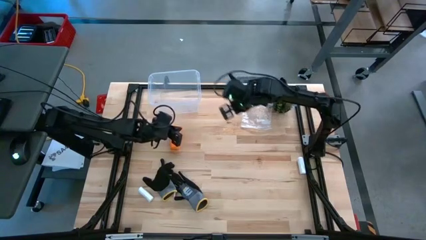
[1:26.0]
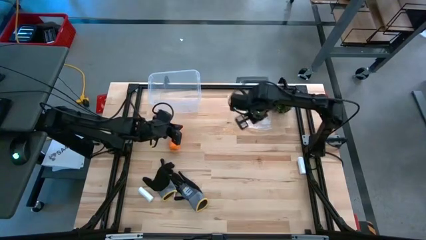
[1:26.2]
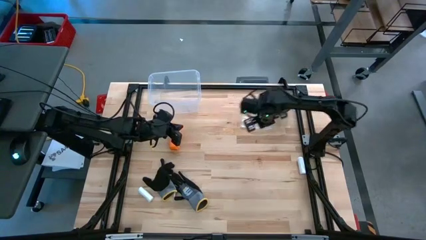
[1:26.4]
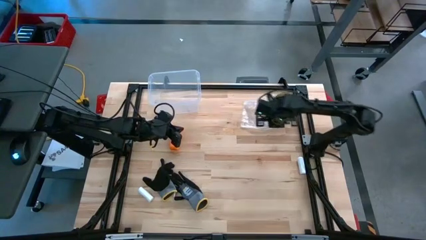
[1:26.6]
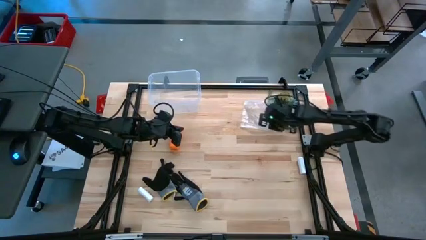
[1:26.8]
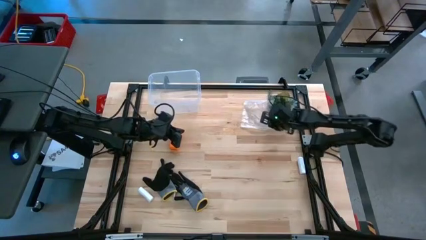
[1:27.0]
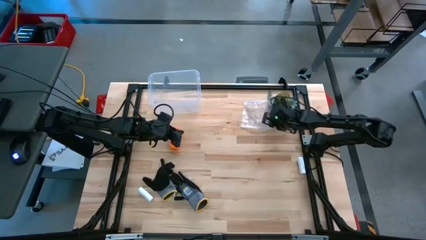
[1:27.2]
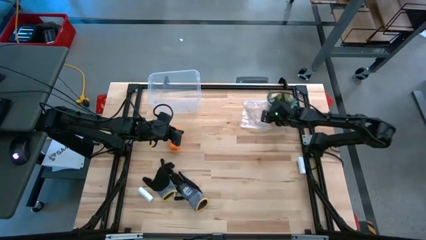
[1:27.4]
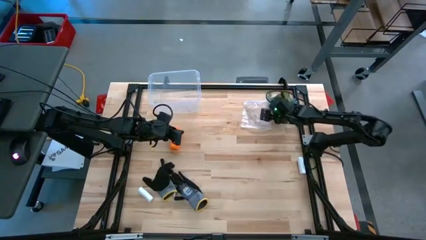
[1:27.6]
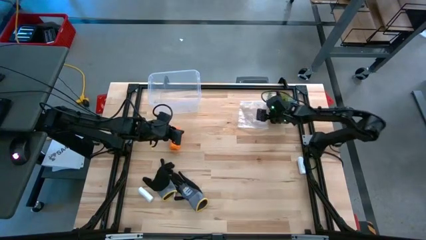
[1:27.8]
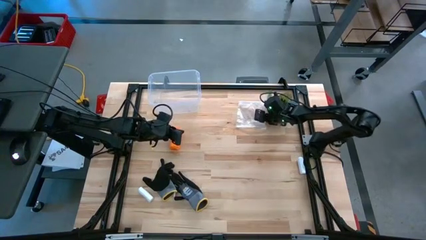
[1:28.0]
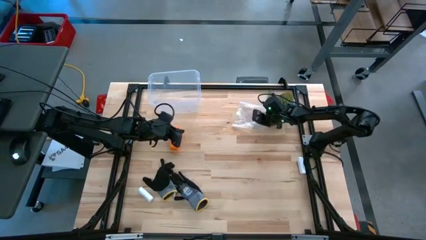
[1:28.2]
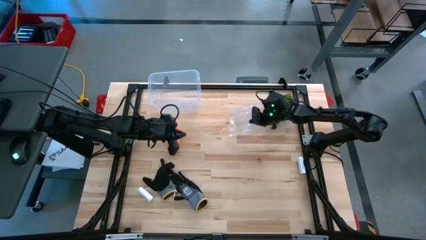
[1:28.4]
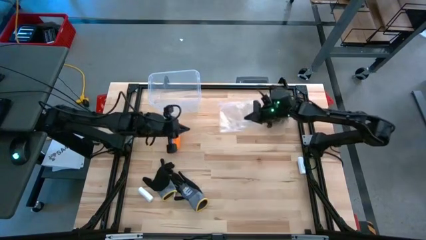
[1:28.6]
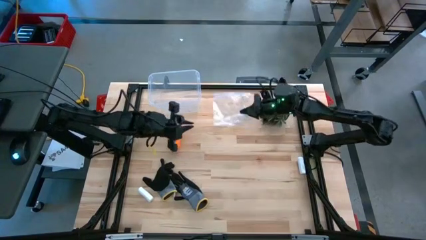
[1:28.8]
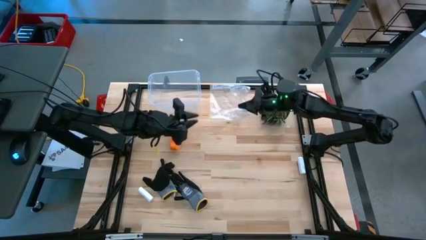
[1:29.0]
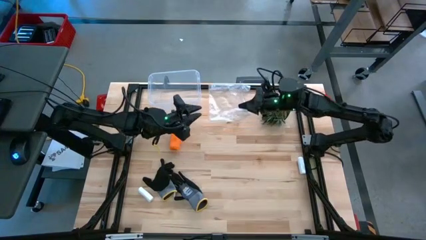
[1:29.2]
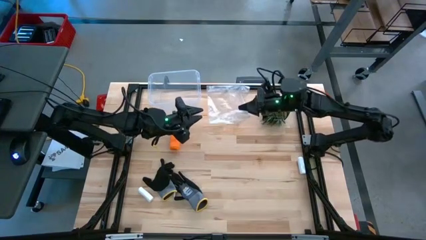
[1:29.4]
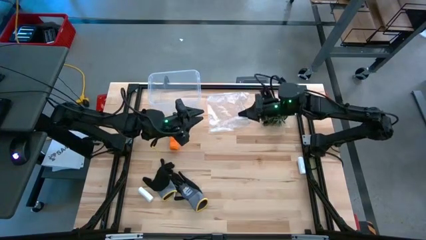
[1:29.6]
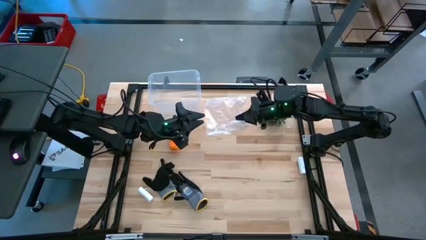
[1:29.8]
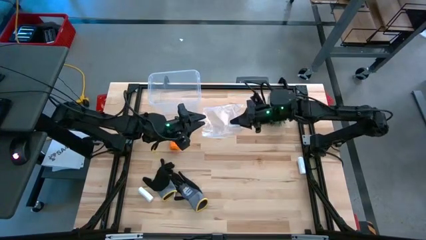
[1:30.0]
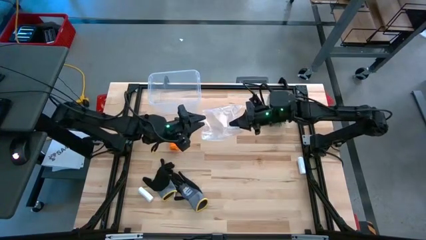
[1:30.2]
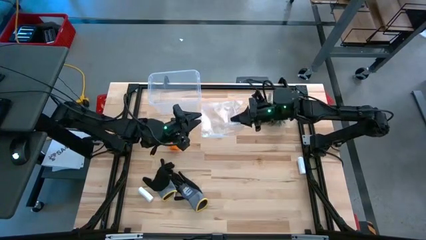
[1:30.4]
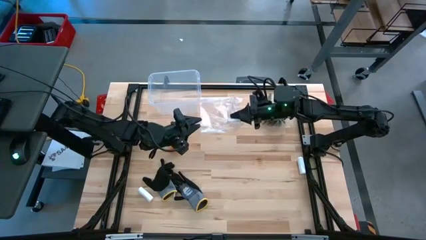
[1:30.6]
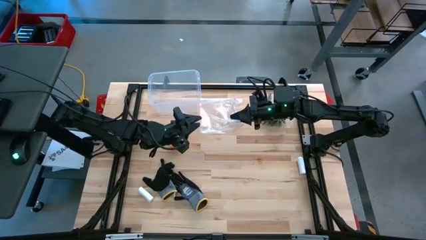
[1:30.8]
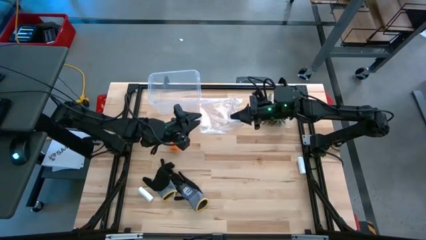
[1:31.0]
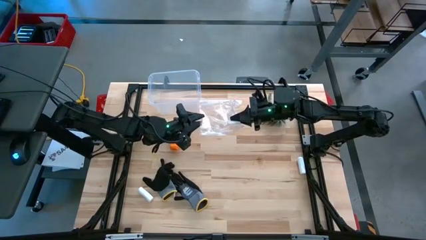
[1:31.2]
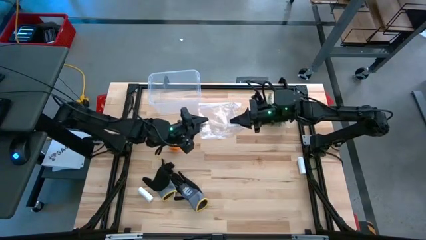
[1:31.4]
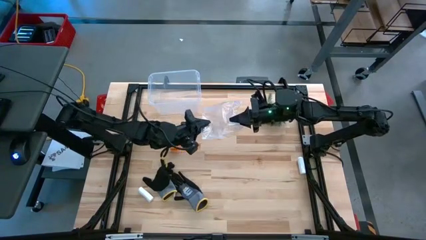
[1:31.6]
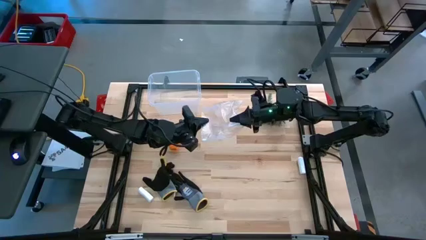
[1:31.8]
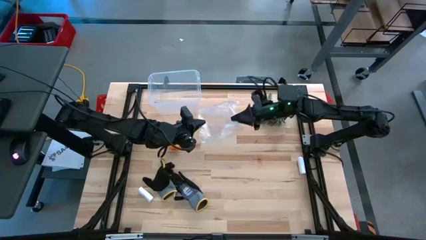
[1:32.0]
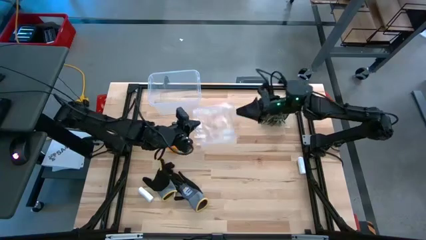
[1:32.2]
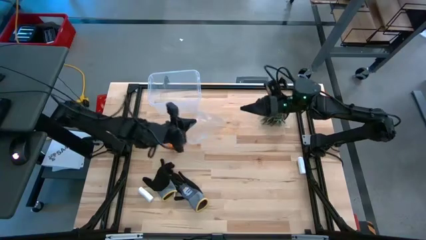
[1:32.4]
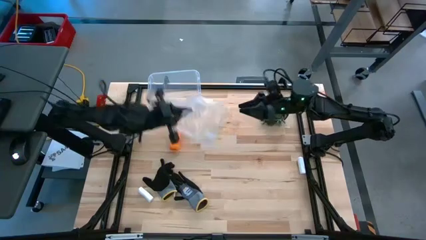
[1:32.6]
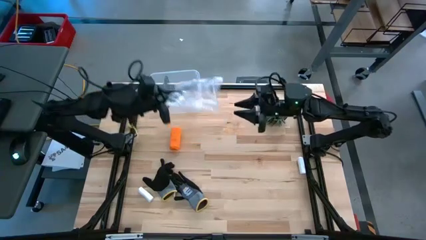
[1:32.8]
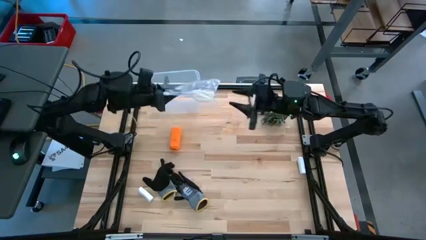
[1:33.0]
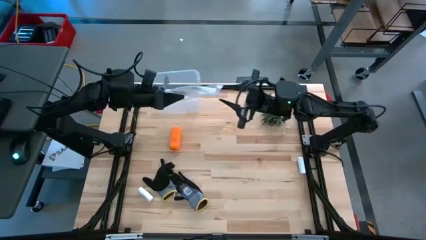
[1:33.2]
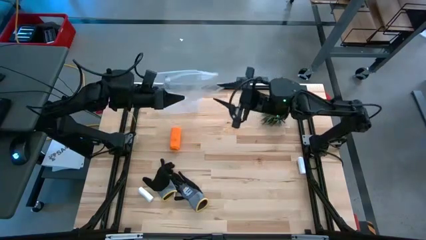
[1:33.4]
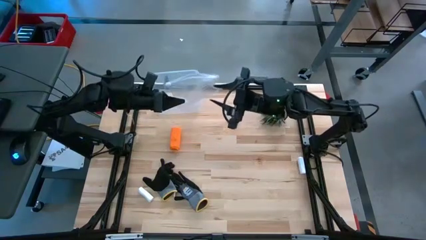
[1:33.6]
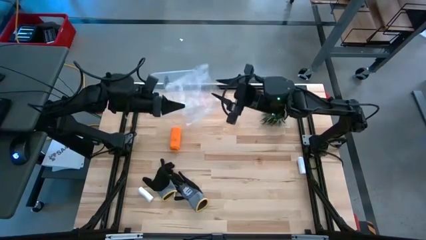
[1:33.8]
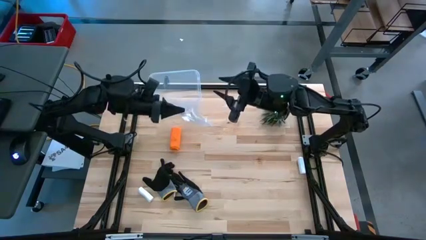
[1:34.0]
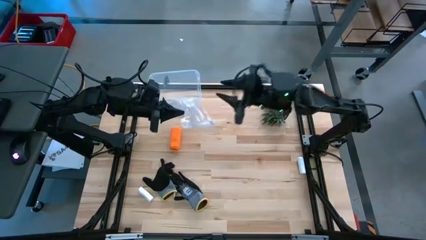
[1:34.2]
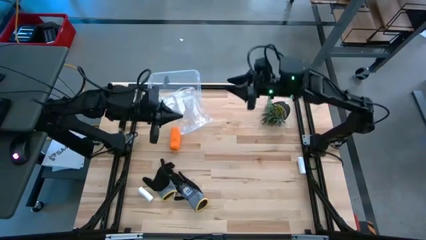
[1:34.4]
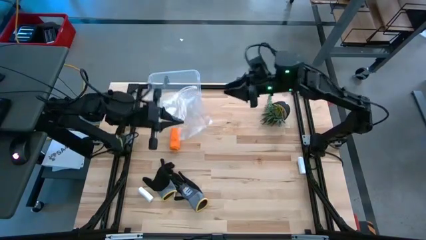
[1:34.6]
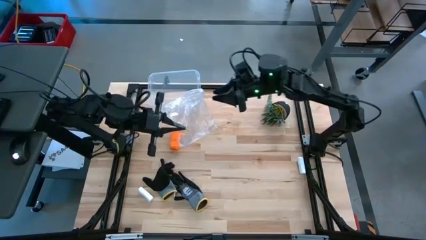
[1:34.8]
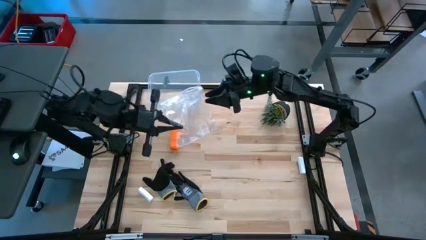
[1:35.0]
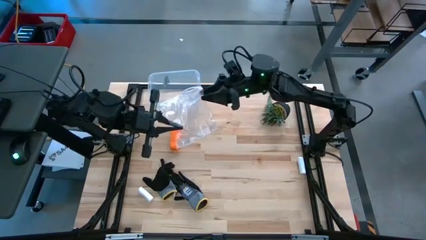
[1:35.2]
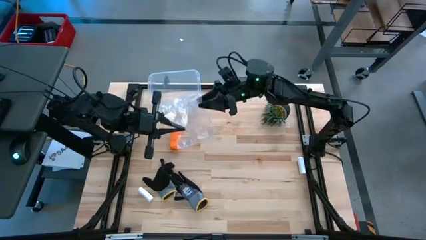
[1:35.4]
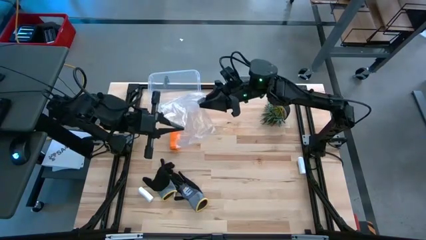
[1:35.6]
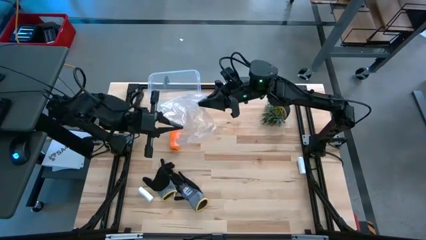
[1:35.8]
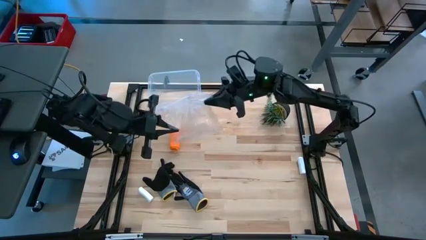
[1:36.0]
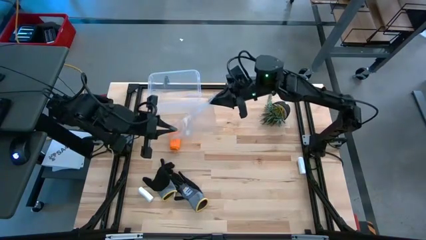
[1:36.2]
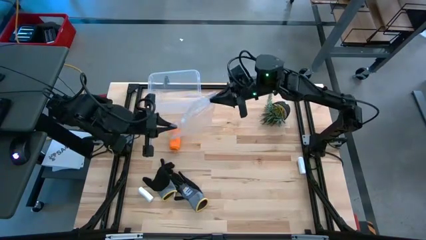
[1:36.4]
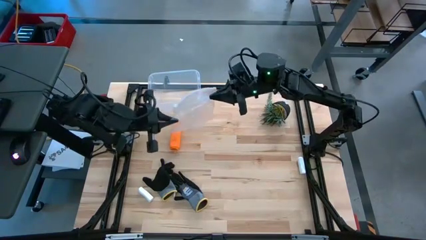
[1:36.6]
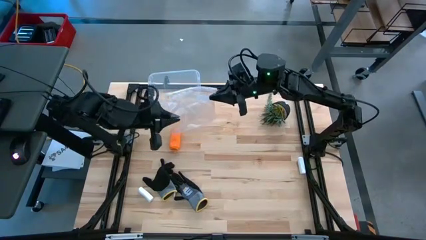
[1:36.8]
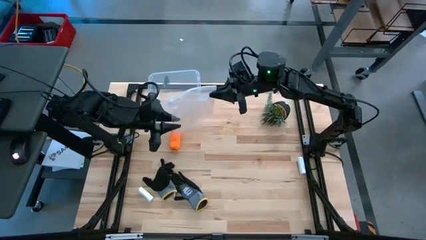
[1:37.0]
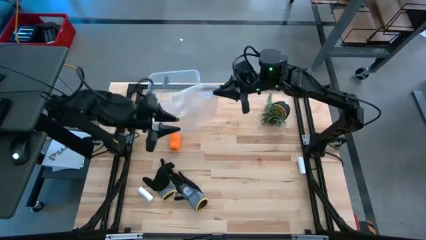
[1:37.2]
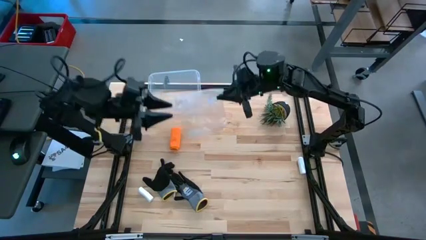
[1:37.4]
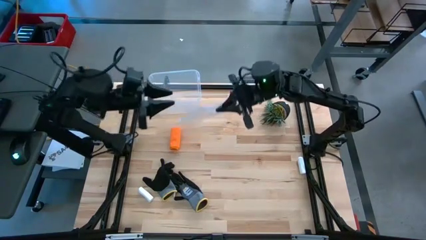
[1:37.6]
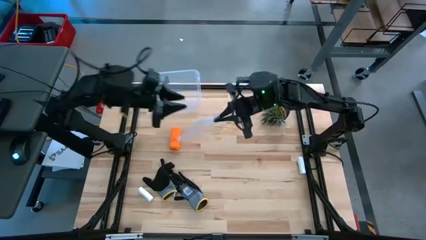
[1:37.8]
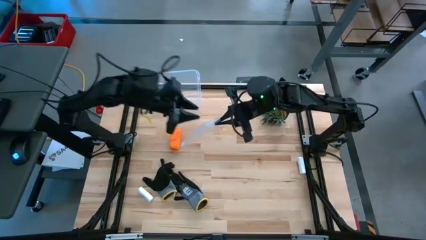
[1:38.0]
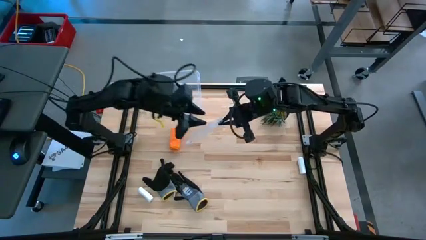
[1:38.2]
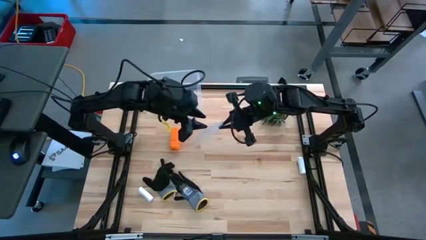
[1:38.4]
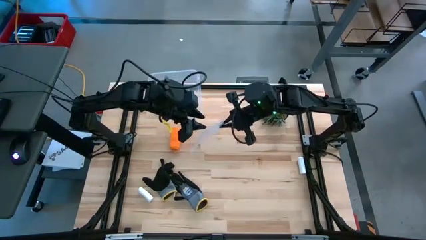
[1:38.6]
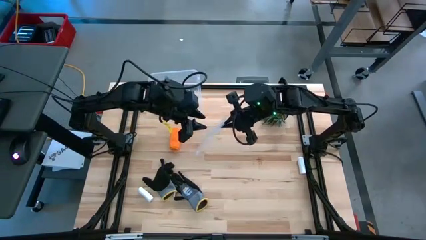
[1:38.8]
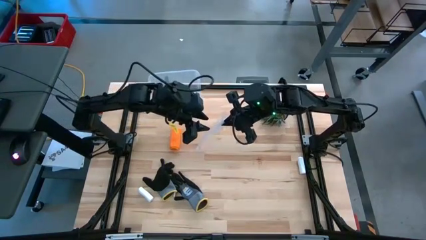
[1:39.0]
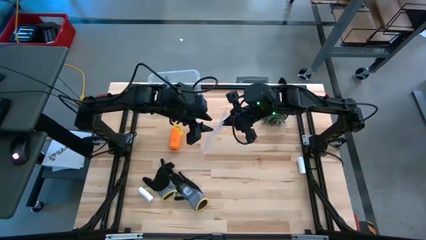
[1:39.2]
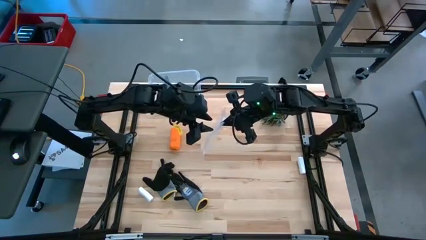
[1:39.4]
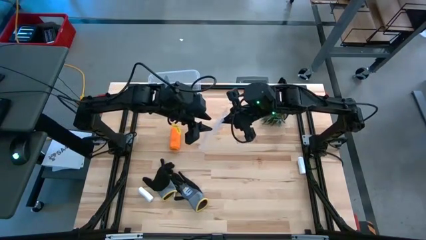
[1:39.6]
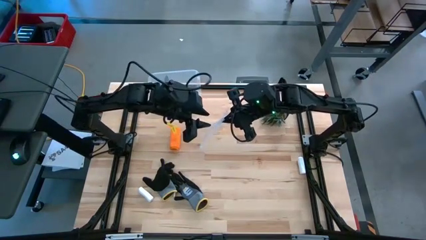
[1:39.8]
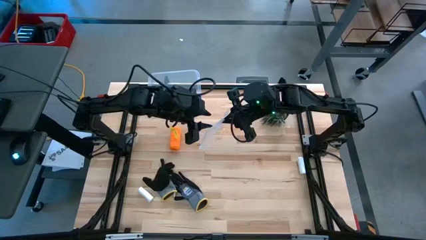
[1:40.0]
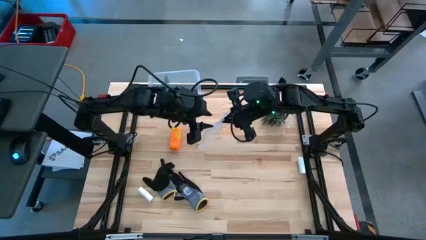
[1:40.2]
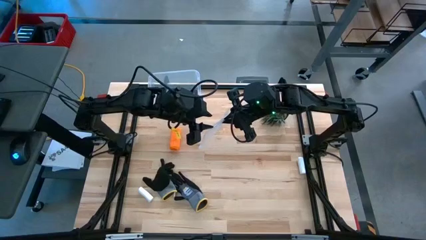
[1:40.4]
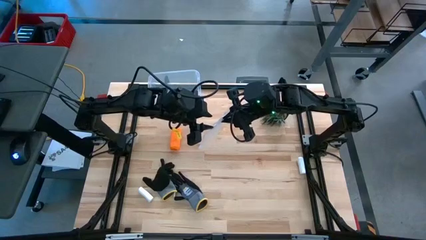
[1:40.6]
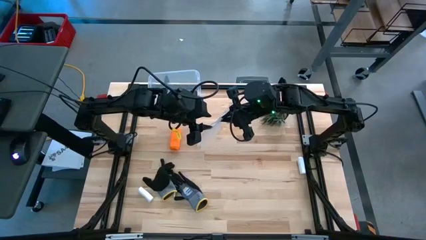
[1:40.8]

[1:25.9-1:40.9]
Task: Roll bandage
Put the rolled orange bandage into the transparent zip bag

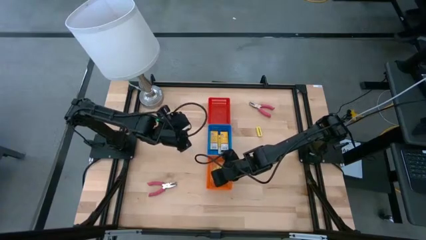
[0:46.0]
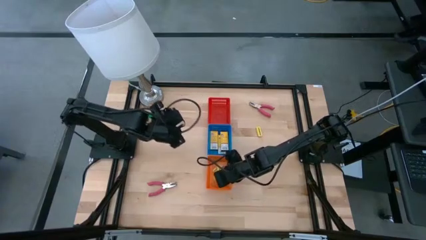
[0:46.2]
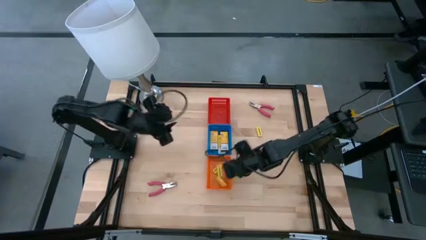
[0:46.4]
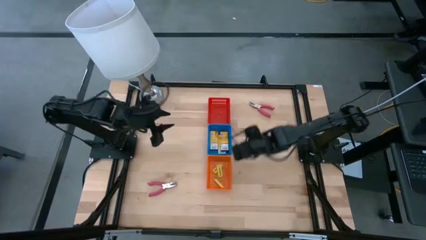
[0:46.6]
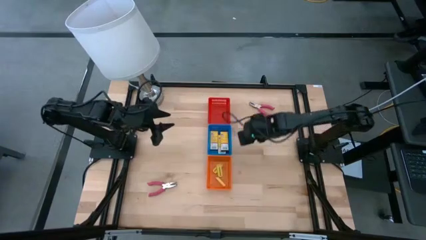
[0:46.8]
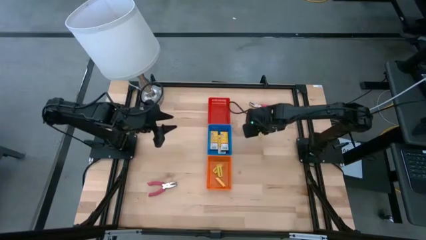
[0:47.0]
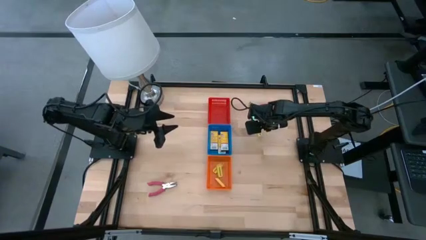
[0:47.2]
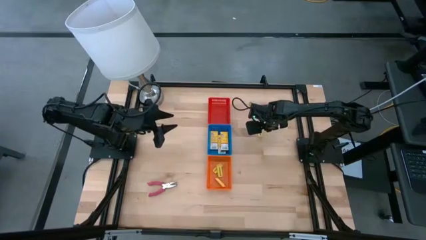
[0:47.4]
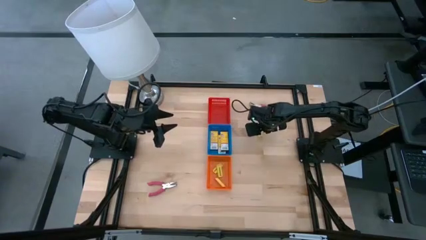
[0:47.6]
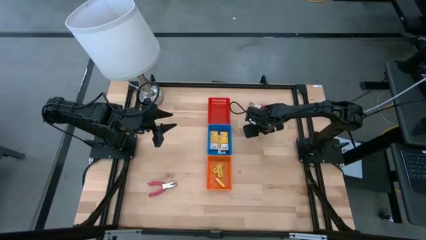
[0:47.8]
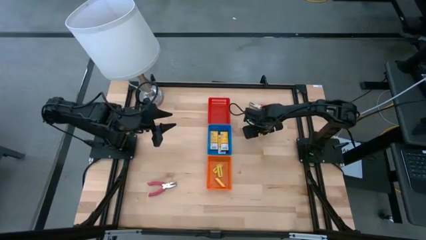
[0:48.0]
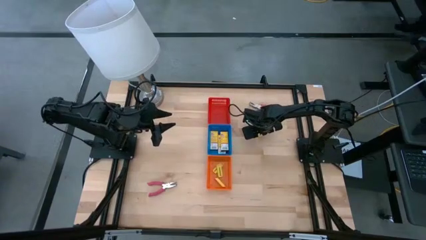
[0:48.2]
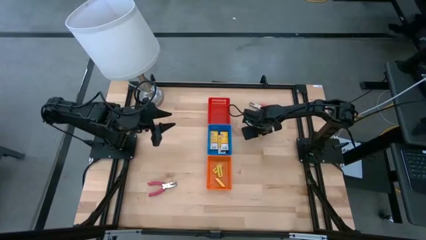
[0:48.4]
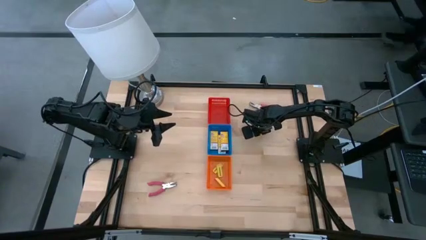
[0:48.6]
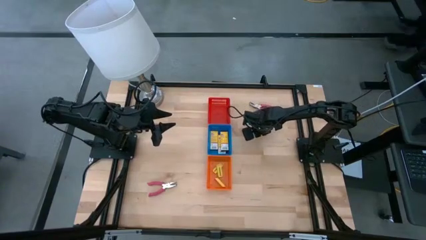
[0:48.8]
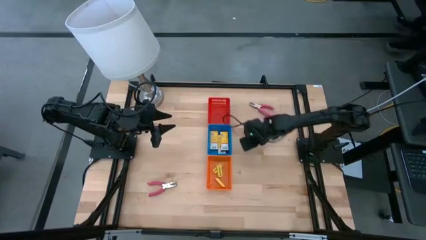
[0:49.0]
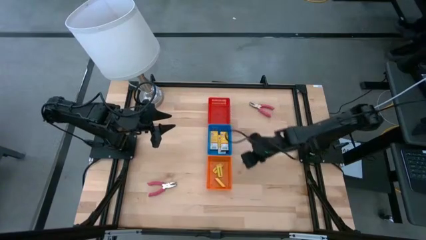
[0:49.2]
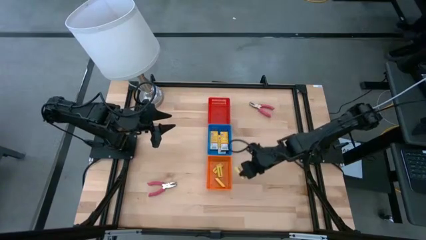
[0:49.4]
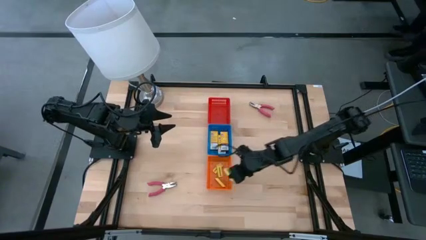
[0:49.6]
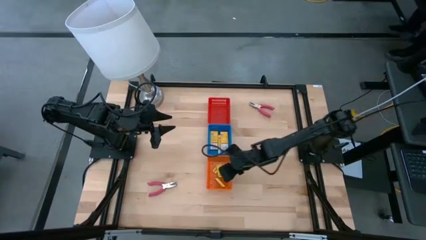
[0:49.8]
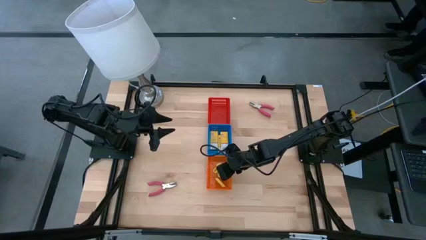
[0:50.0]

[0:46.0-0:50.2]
Task: Pick & Place School Supplies
Put the yellow eraser into the orange bin
